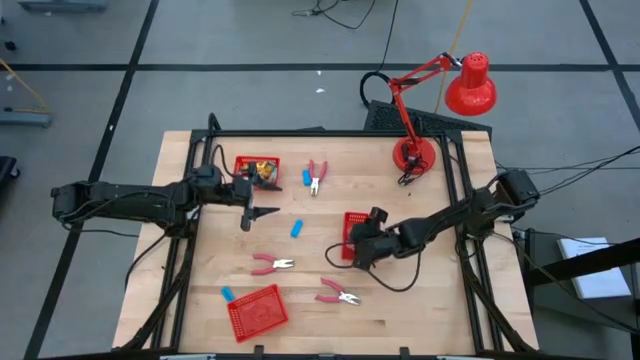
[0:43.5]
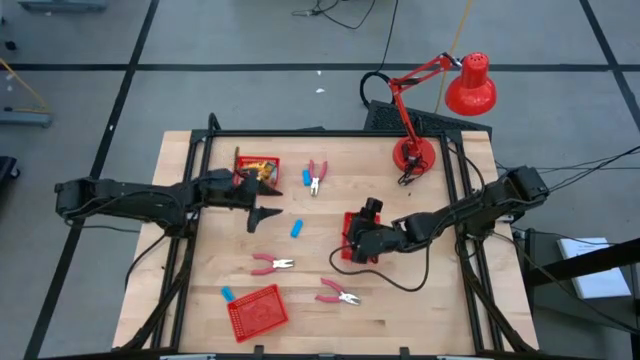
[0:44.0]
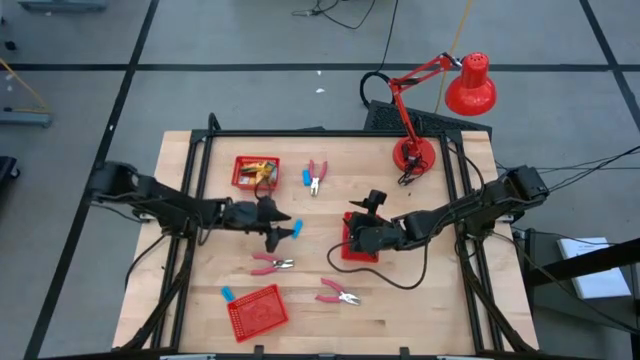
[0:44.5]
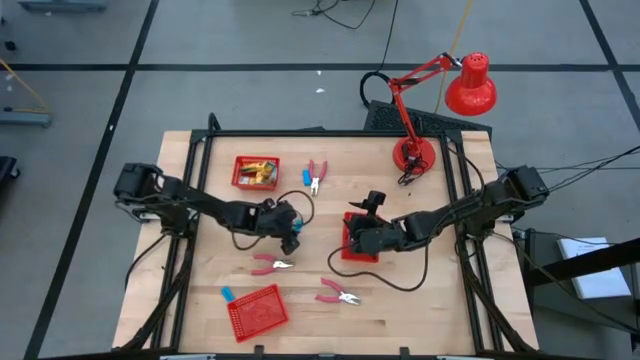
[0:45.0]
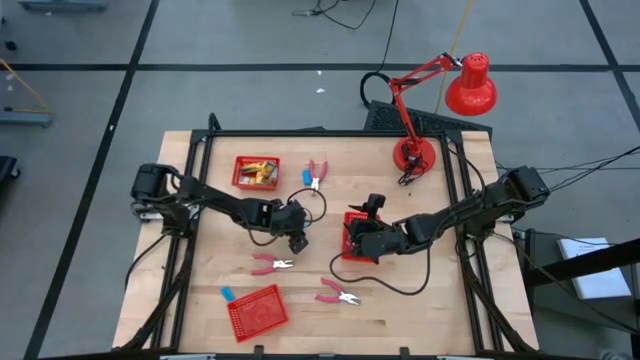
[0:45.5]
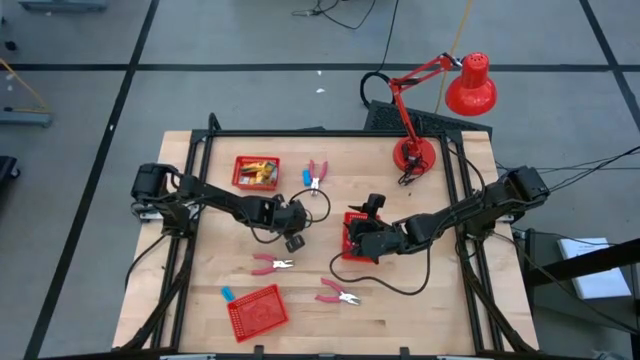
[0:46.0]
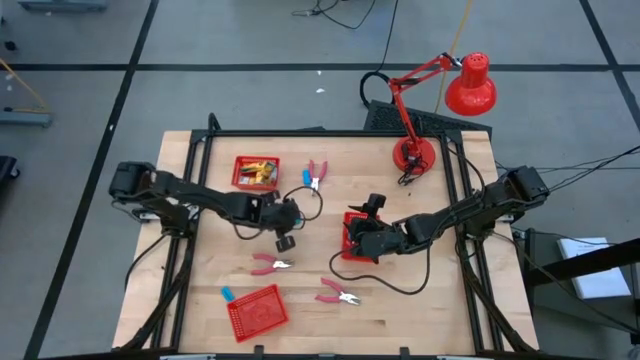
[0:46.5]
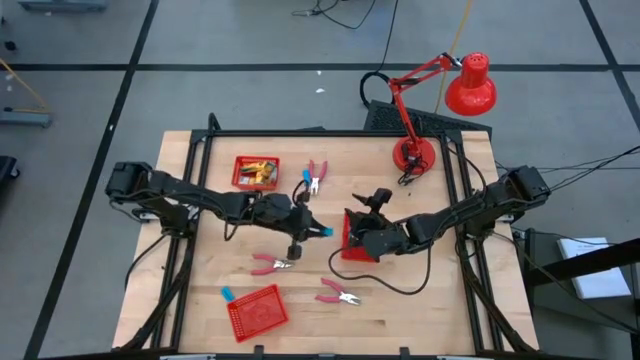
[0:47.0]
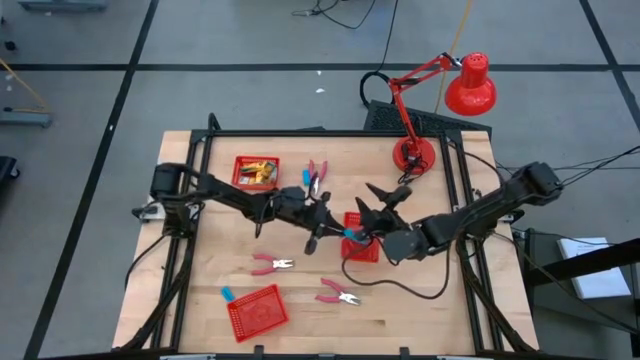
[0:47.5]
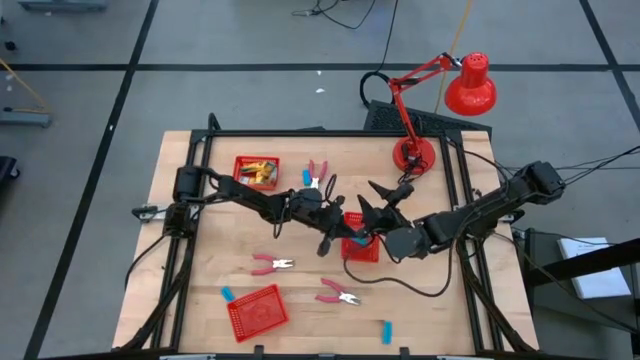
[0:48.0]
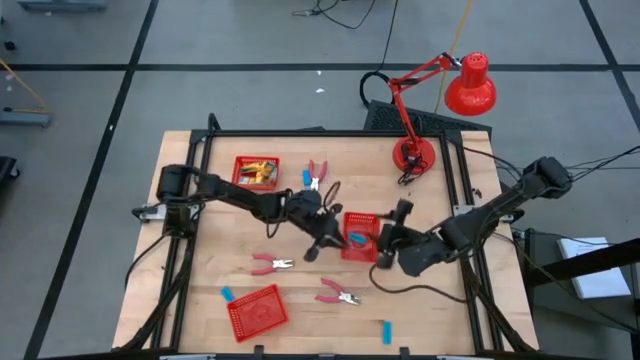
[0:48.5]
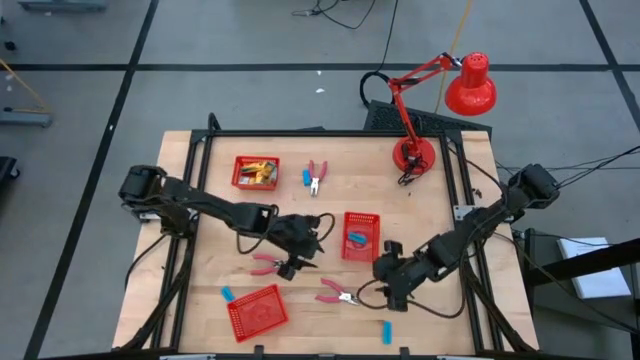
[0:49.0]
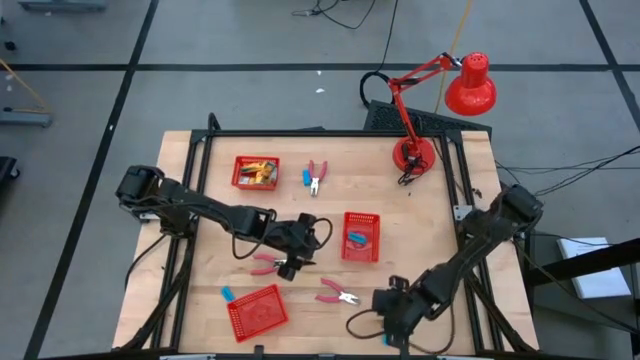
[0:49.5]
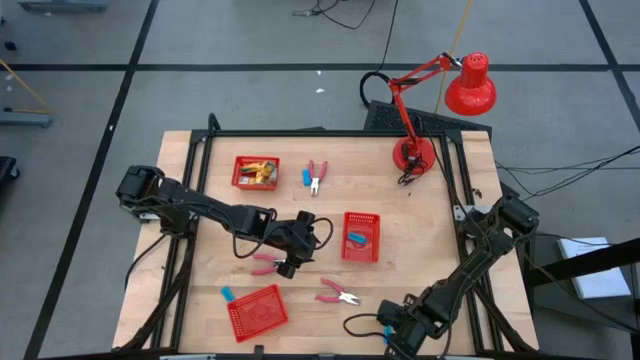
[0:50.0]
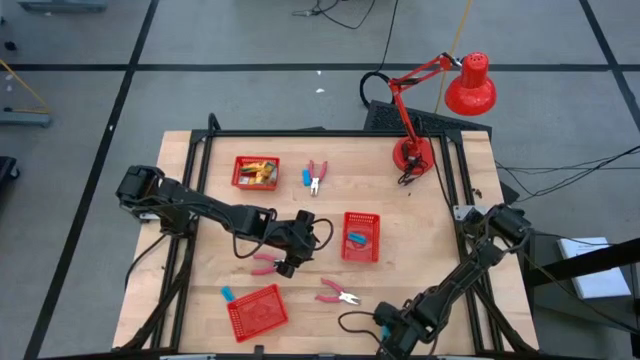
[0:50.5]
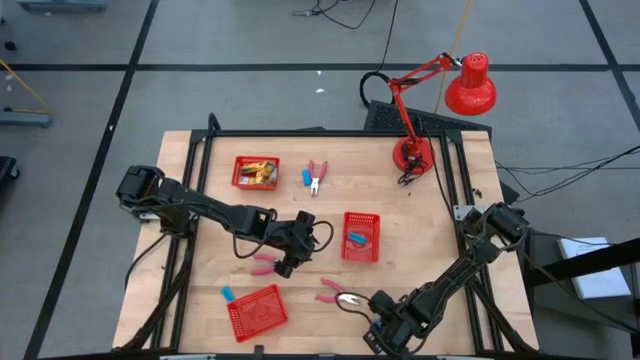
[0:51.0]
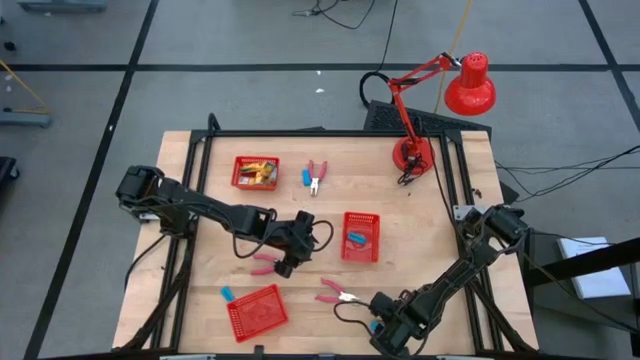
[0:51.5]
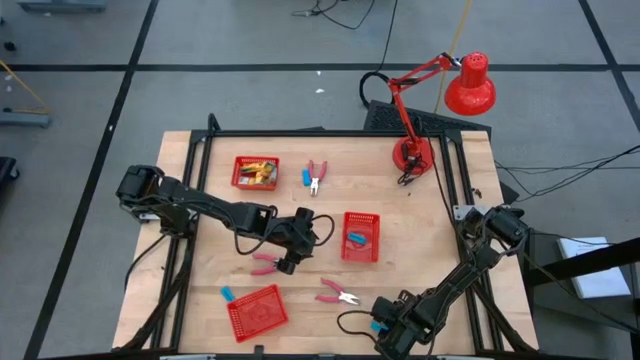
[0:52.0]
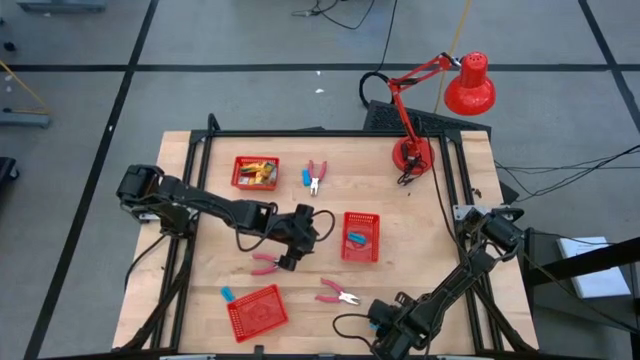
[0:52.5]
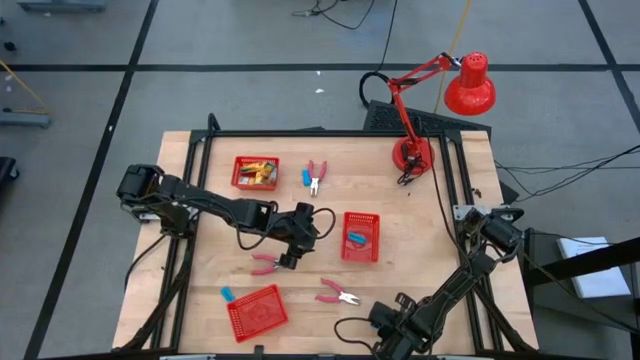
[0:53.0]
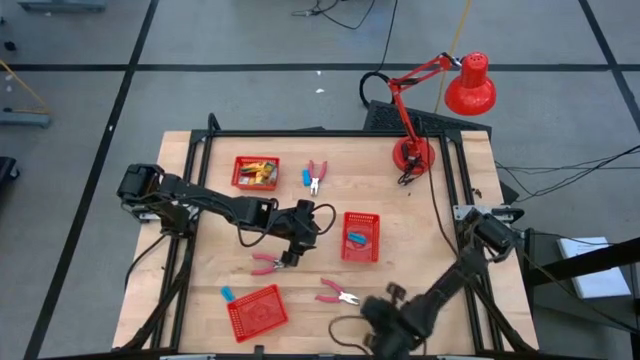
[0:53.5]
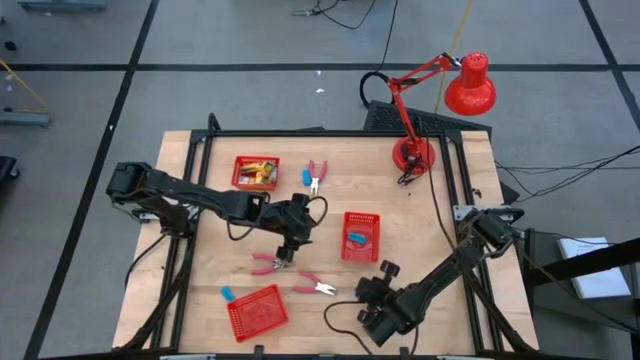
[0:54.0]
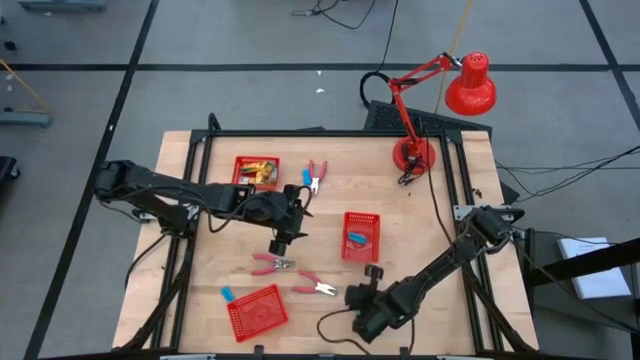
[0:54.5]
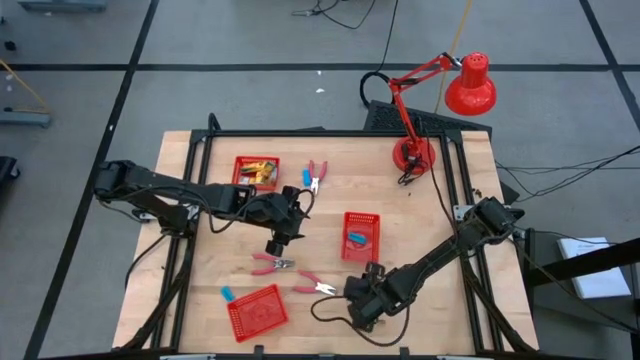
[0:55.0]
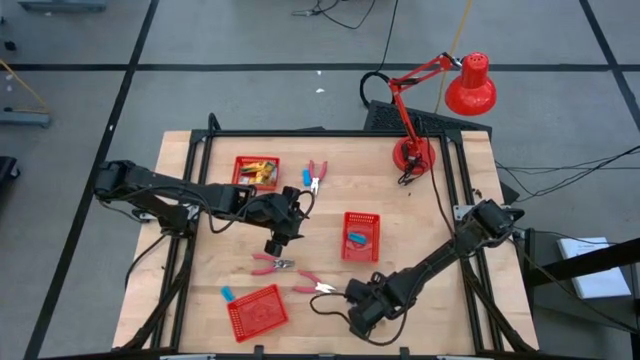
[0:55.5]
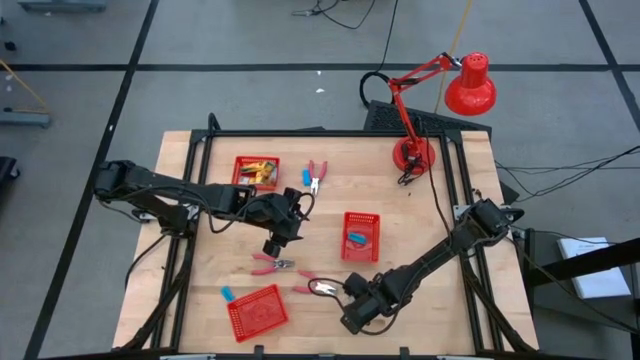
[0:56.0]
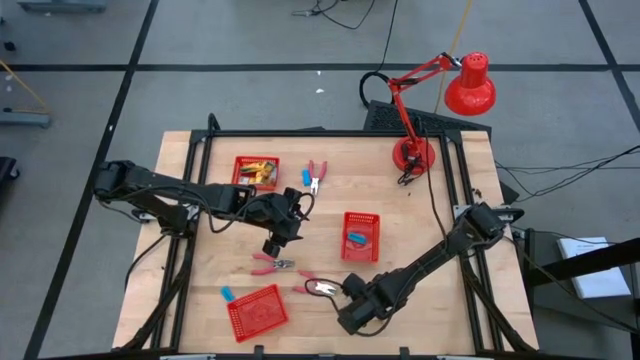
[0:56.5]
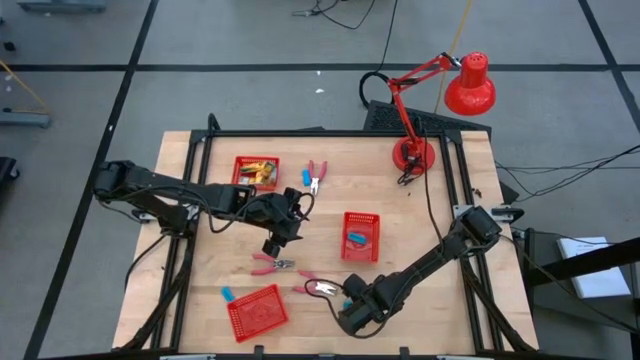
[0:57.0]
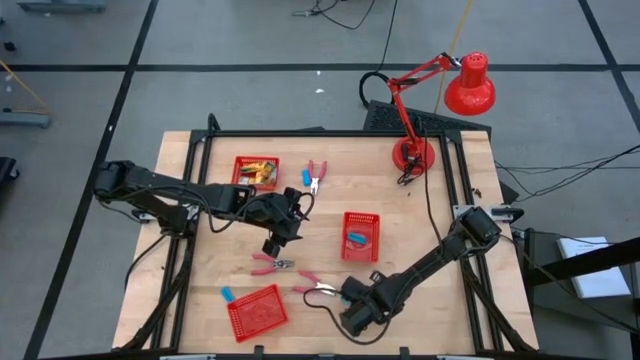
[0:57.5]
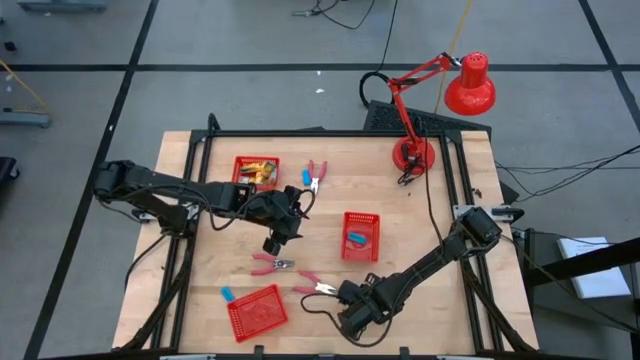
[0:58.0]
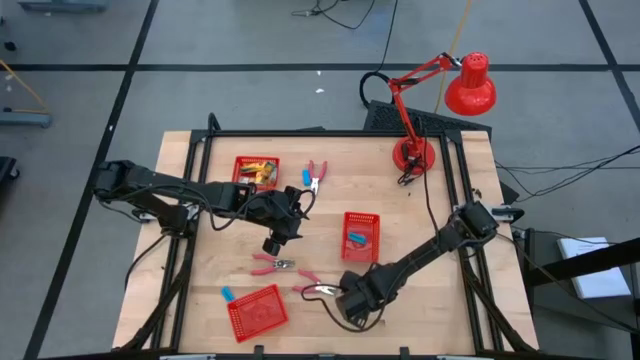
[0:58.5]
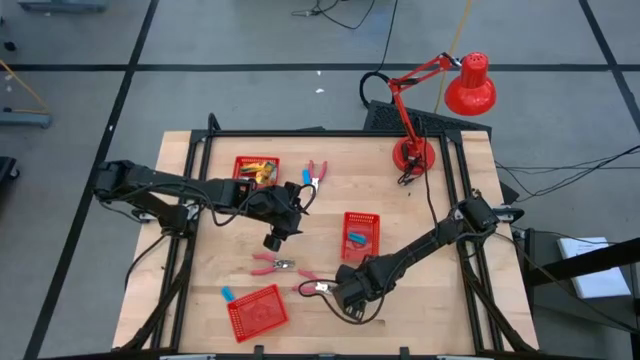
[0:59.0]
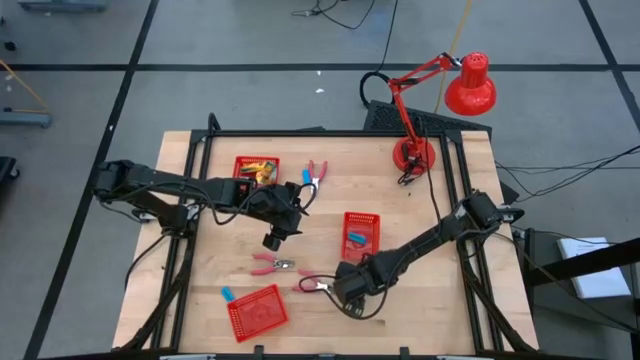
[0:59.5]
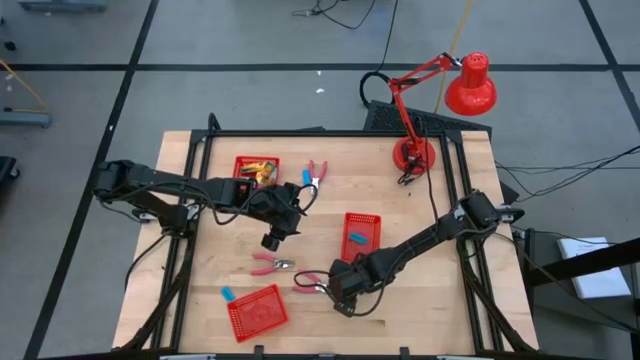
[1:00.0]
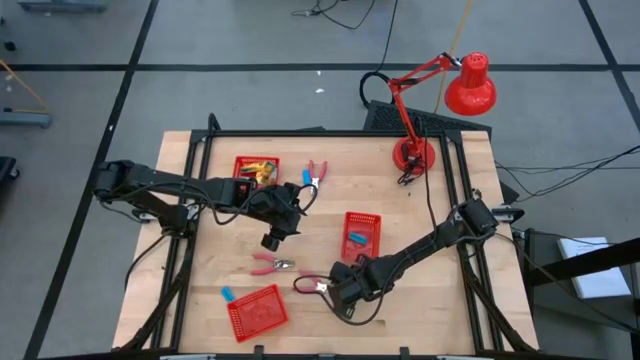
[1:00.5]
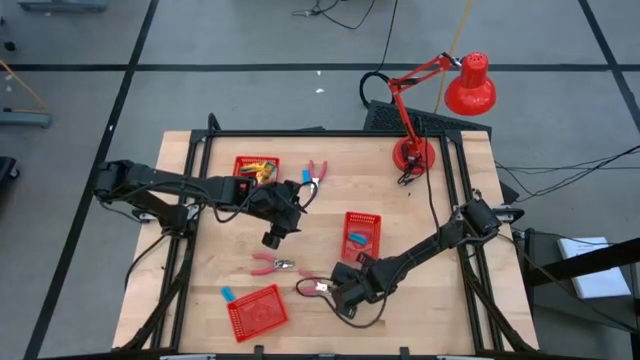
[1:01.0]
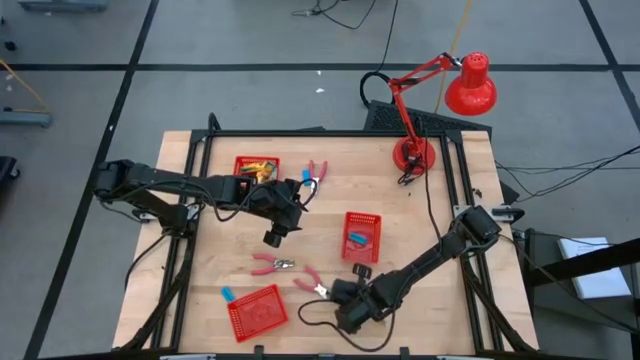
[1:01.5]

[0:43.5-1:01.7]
Task: Pick & Place School Supplies
Put the blue eraser into the middle red basket

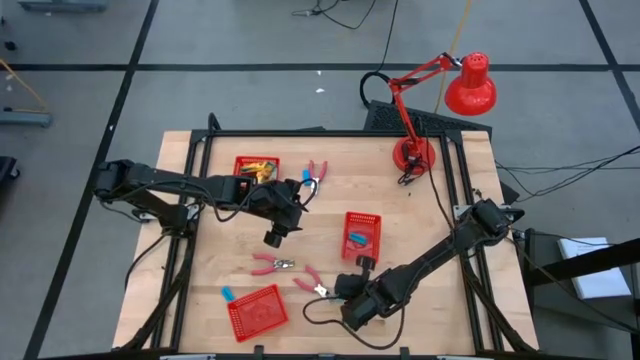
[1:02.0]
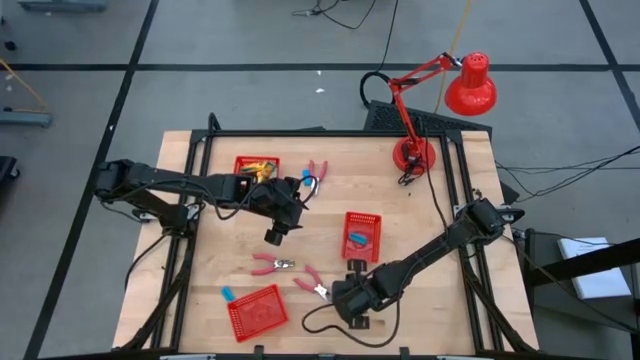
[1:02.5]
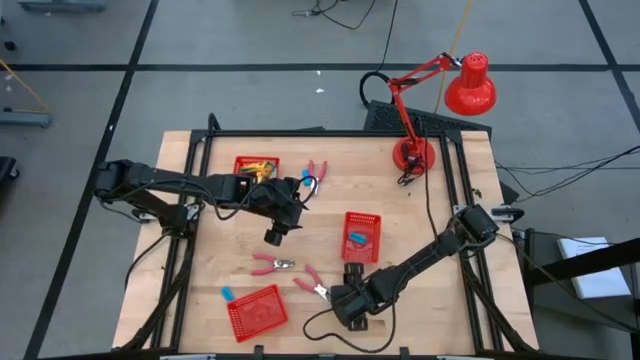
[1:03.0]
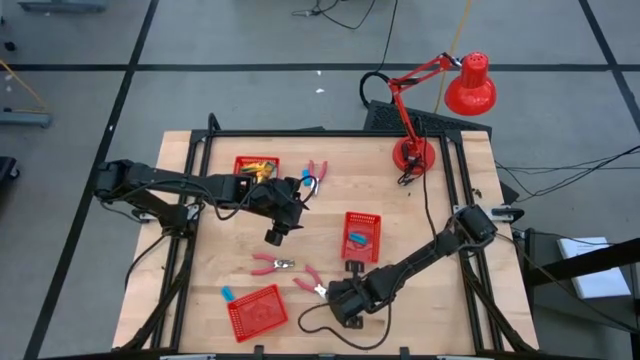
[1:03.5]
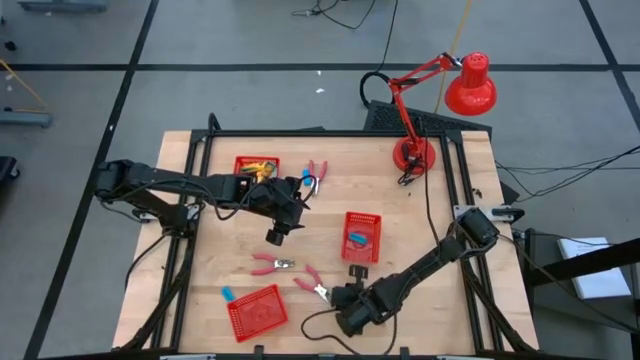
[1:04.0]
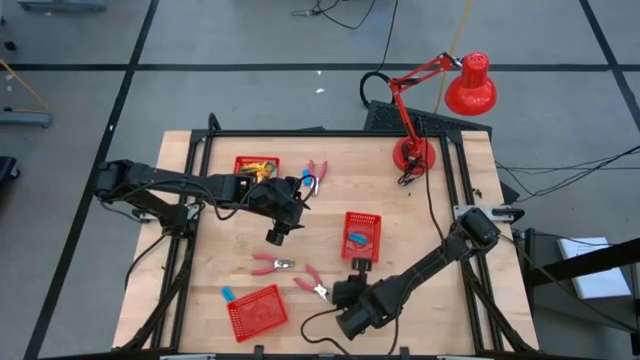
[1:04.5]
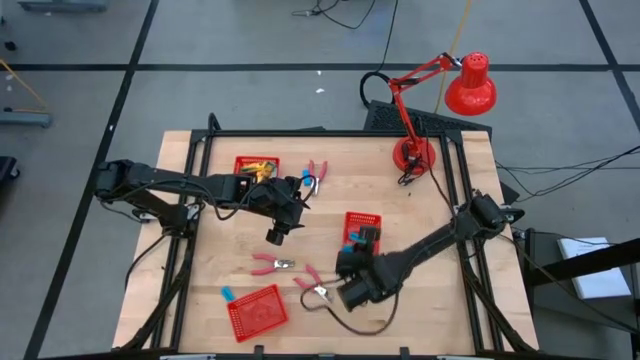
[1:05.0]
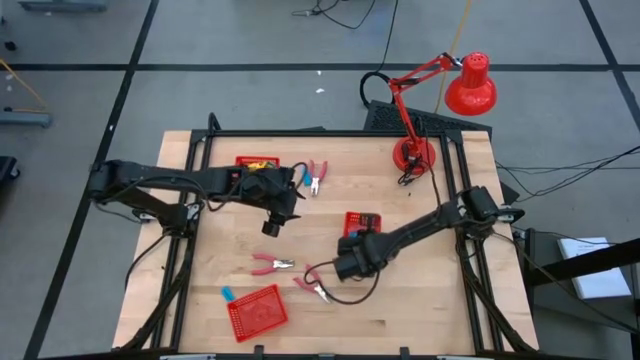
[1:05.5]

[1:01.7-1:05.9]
Put the blue eraser into the middle red basket
